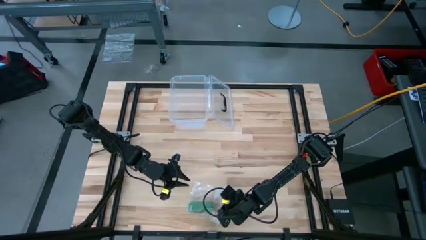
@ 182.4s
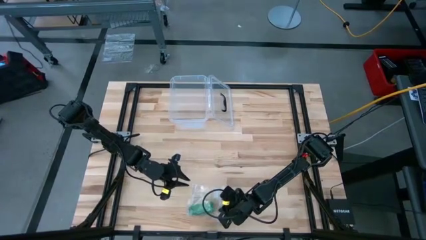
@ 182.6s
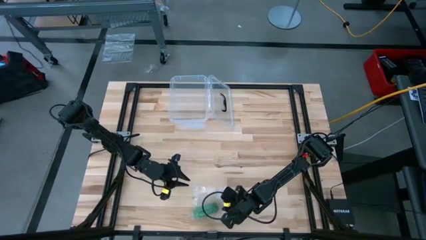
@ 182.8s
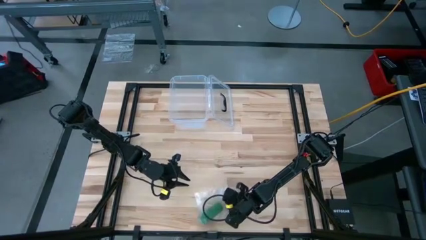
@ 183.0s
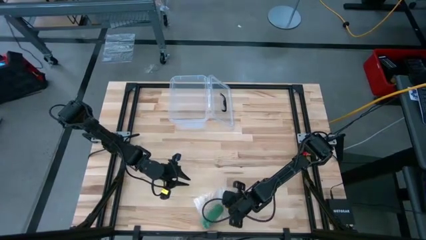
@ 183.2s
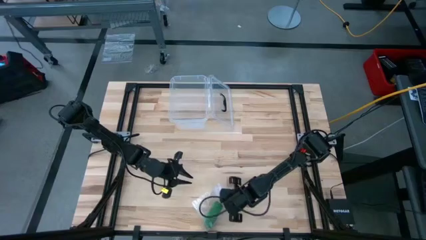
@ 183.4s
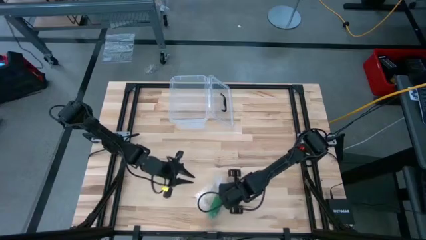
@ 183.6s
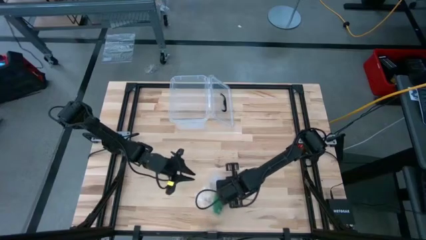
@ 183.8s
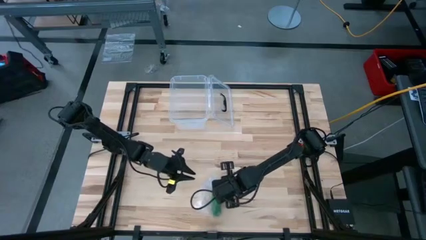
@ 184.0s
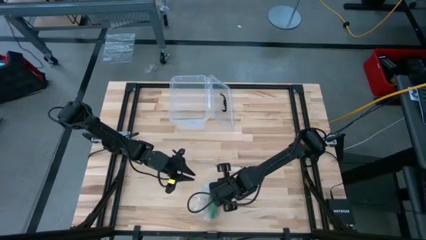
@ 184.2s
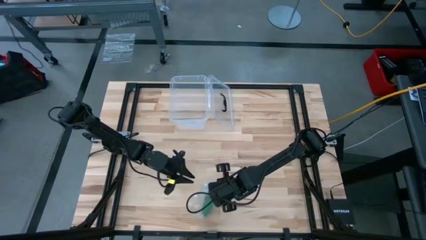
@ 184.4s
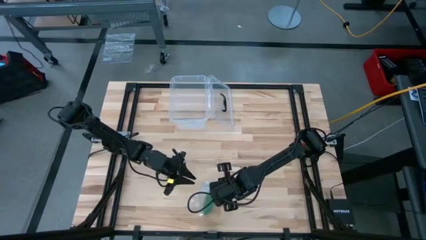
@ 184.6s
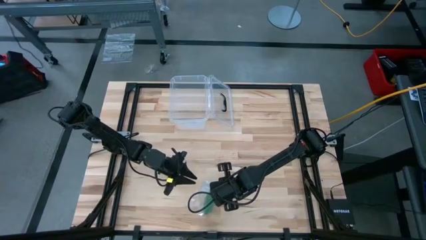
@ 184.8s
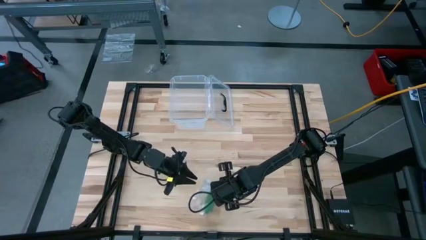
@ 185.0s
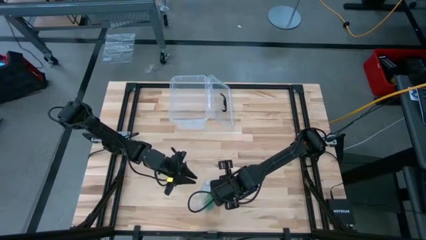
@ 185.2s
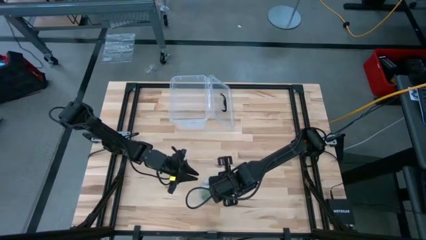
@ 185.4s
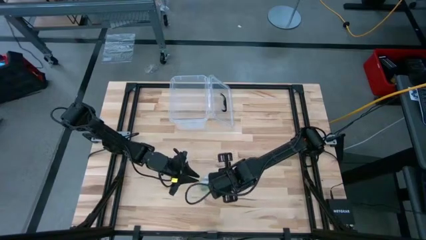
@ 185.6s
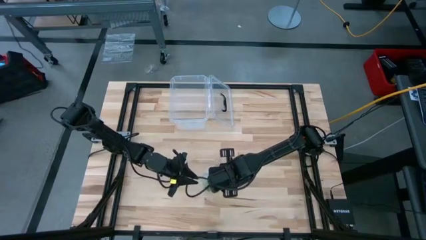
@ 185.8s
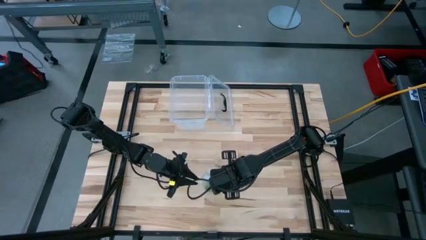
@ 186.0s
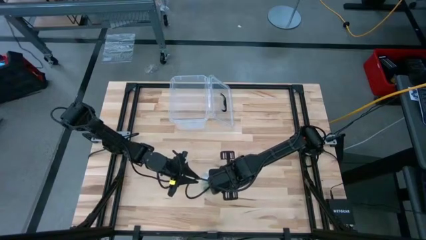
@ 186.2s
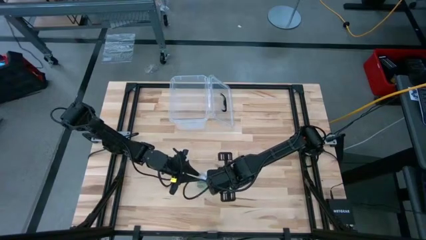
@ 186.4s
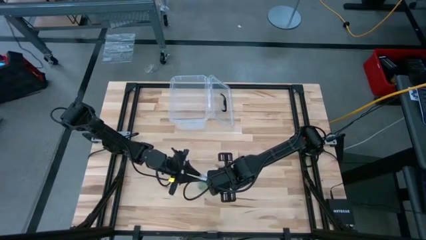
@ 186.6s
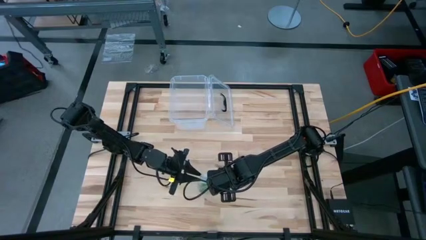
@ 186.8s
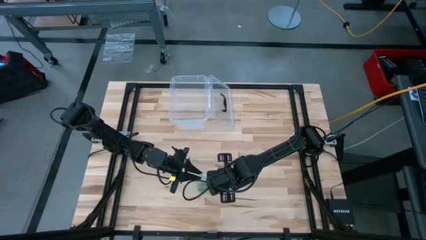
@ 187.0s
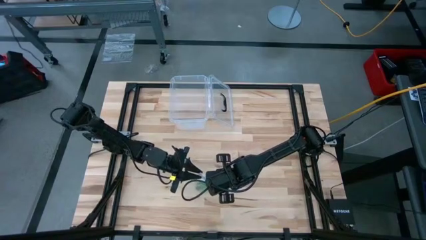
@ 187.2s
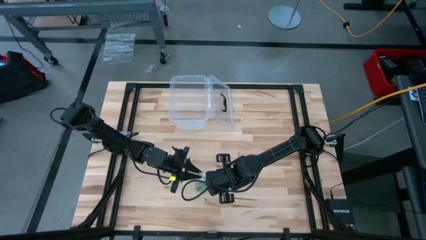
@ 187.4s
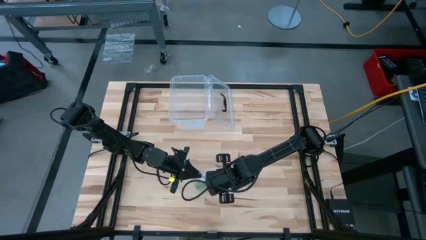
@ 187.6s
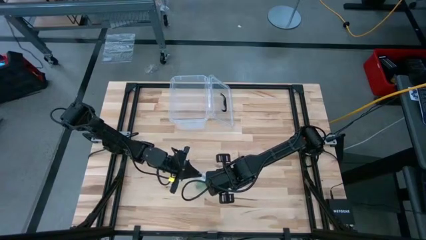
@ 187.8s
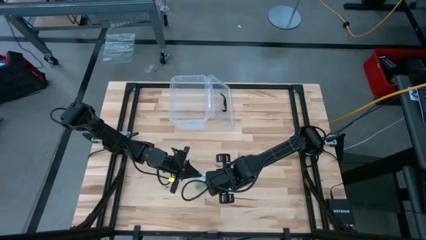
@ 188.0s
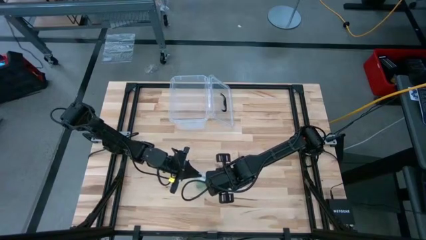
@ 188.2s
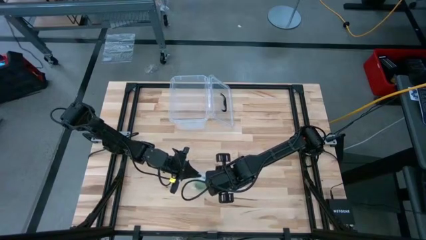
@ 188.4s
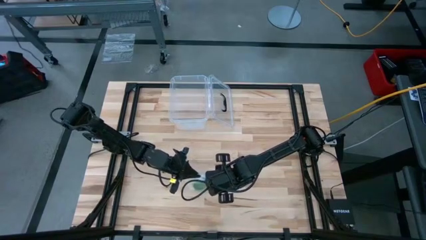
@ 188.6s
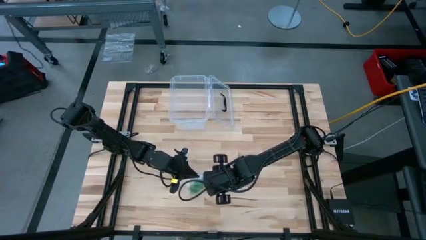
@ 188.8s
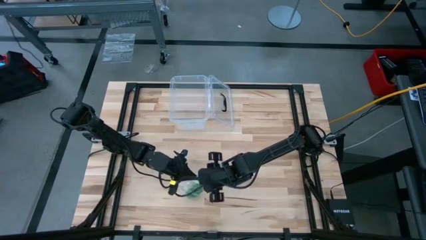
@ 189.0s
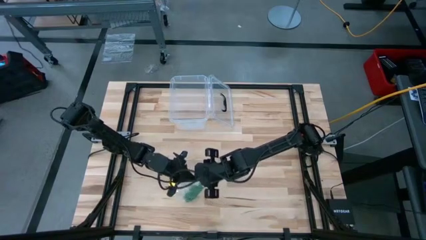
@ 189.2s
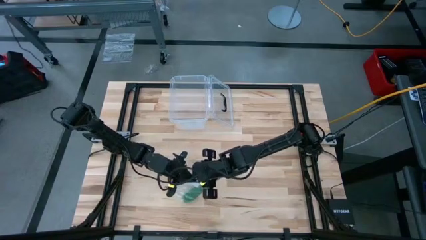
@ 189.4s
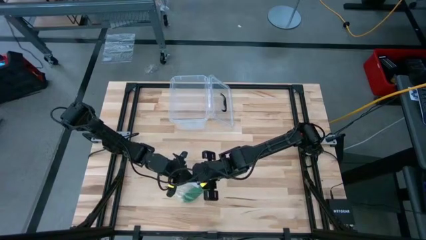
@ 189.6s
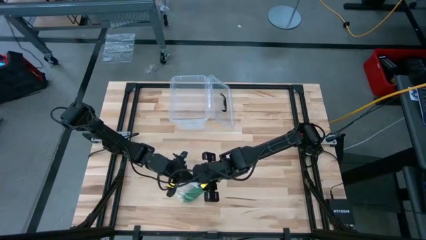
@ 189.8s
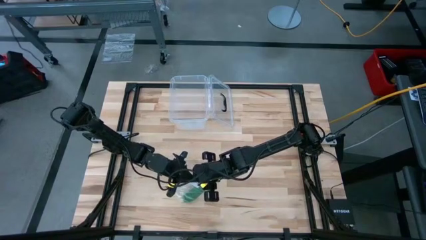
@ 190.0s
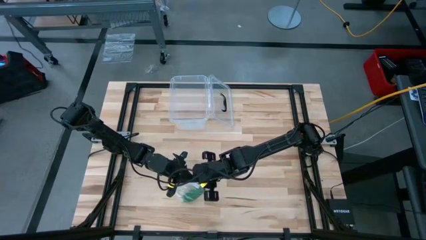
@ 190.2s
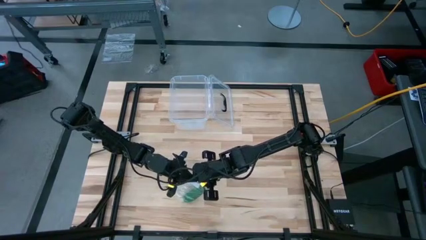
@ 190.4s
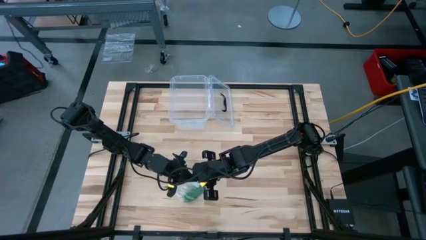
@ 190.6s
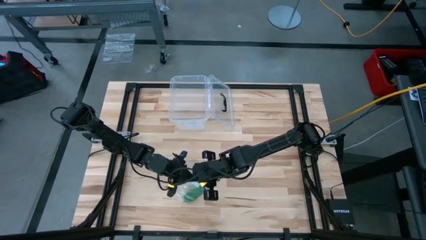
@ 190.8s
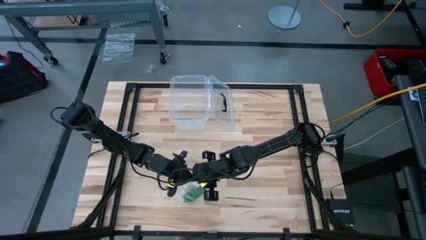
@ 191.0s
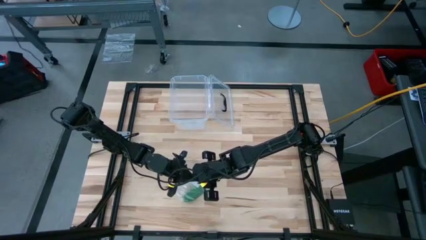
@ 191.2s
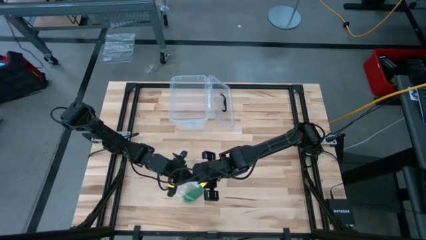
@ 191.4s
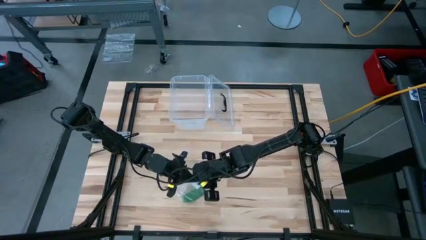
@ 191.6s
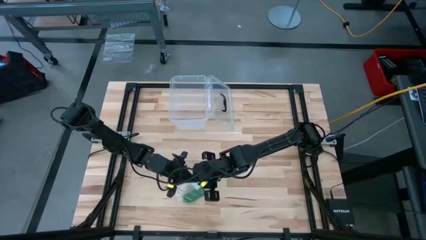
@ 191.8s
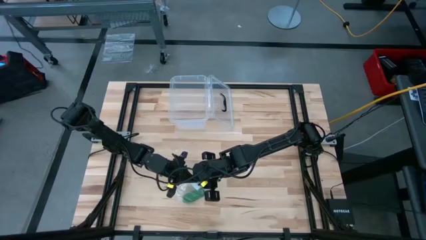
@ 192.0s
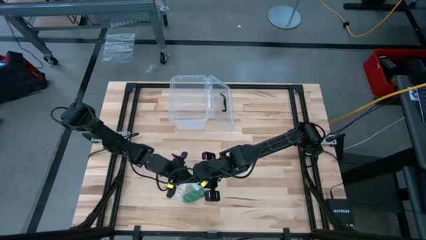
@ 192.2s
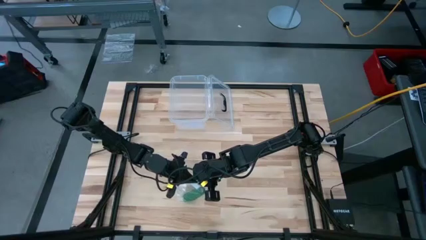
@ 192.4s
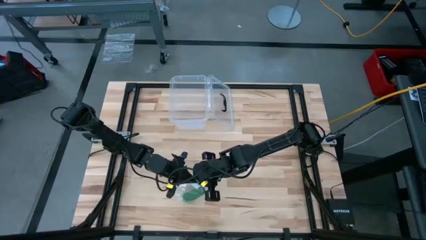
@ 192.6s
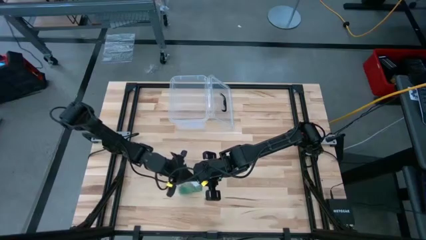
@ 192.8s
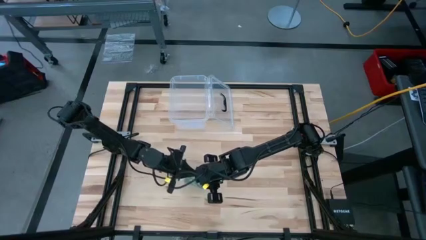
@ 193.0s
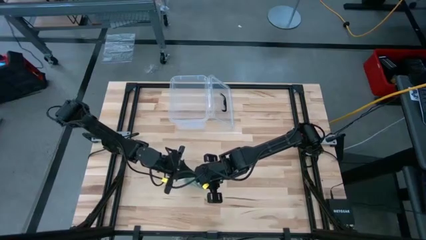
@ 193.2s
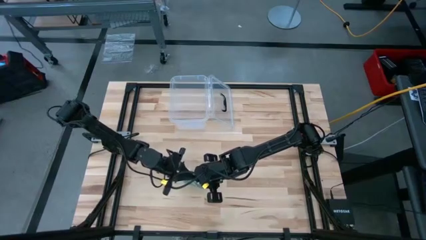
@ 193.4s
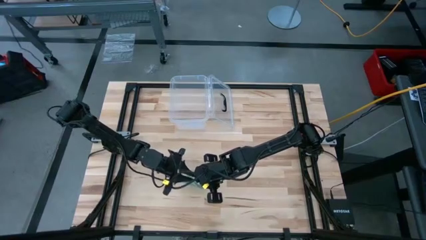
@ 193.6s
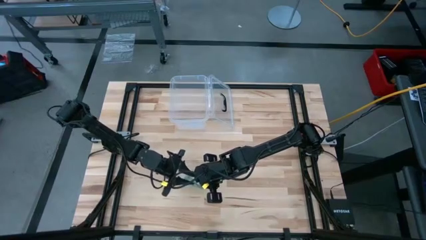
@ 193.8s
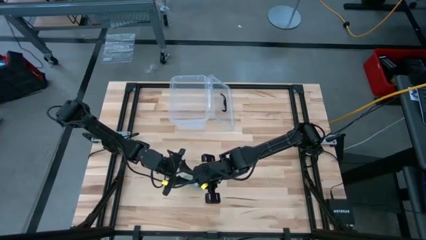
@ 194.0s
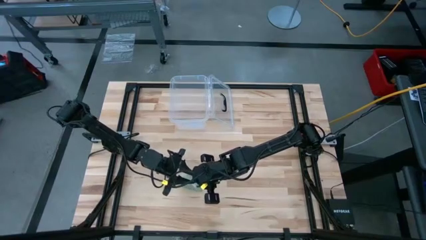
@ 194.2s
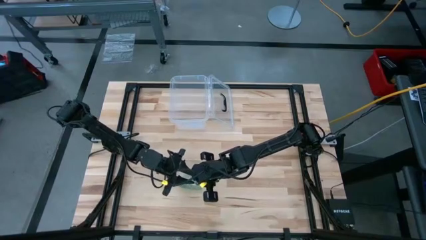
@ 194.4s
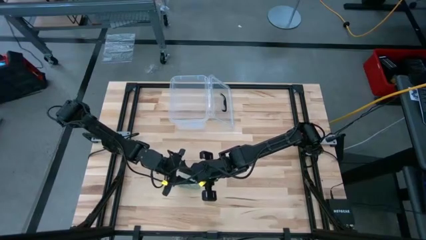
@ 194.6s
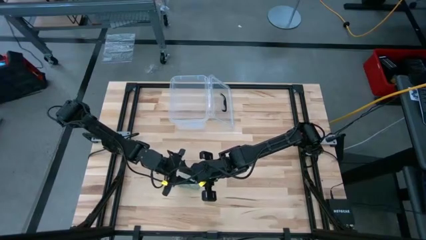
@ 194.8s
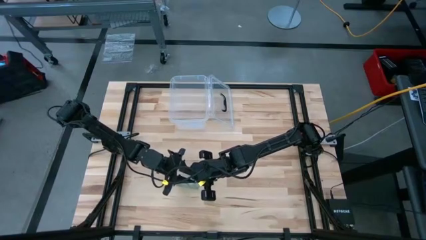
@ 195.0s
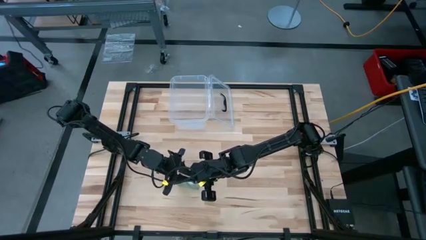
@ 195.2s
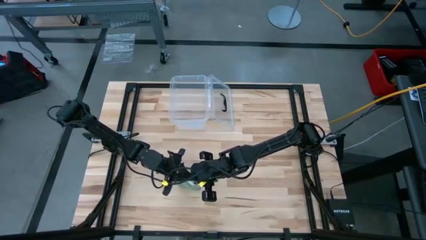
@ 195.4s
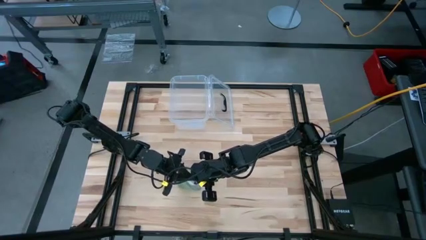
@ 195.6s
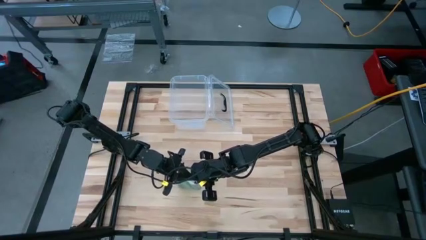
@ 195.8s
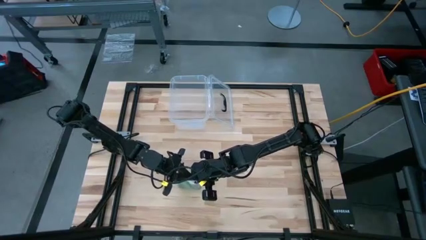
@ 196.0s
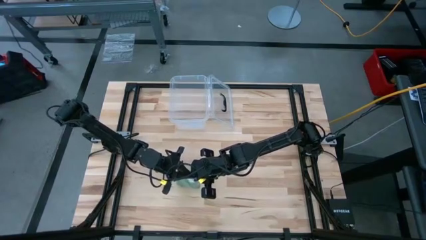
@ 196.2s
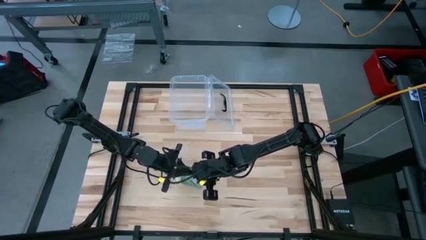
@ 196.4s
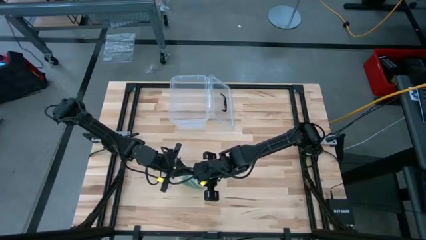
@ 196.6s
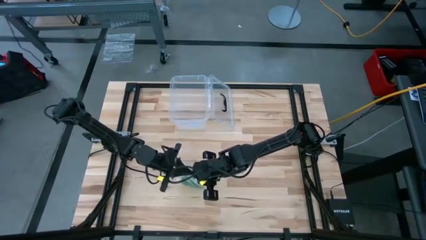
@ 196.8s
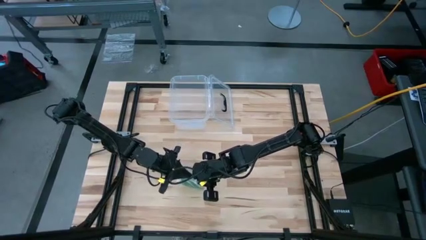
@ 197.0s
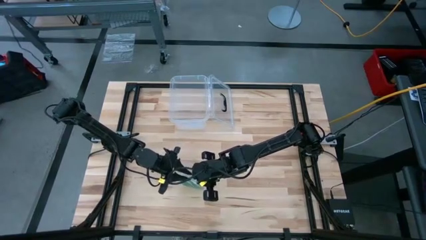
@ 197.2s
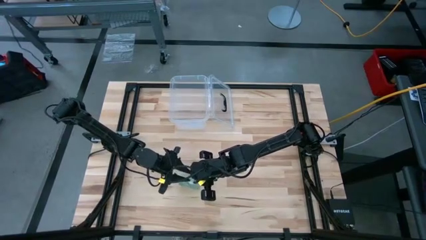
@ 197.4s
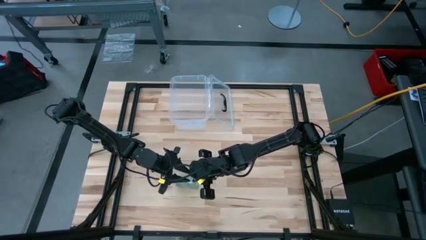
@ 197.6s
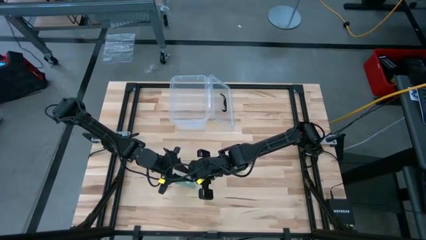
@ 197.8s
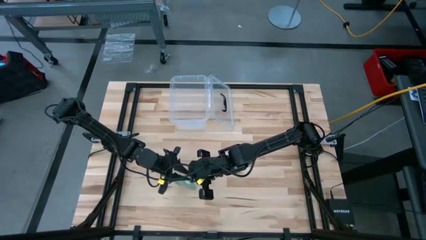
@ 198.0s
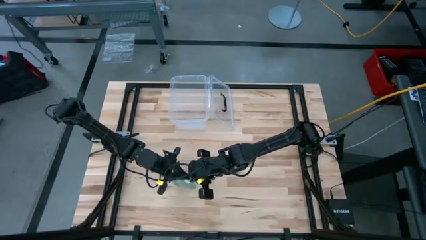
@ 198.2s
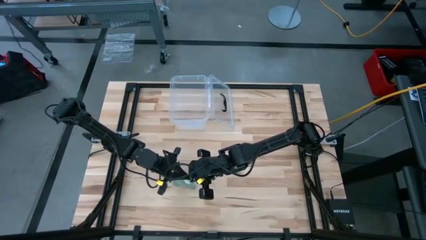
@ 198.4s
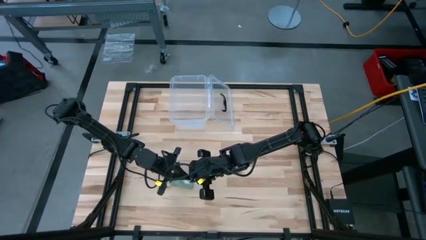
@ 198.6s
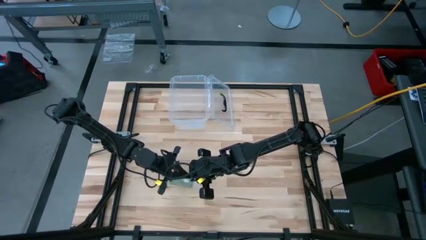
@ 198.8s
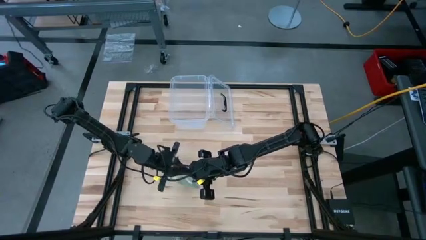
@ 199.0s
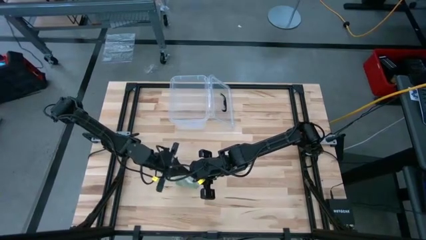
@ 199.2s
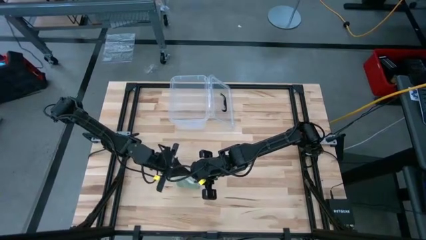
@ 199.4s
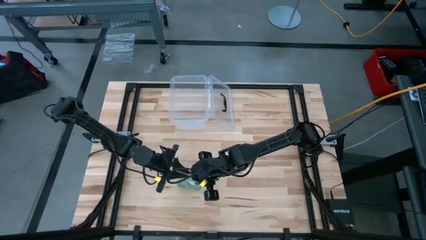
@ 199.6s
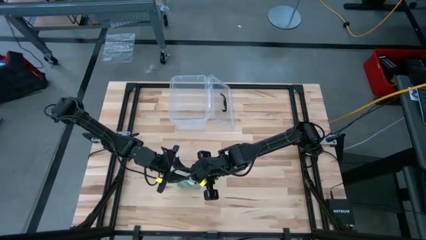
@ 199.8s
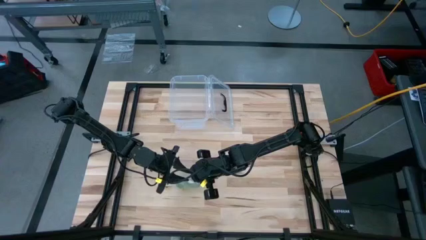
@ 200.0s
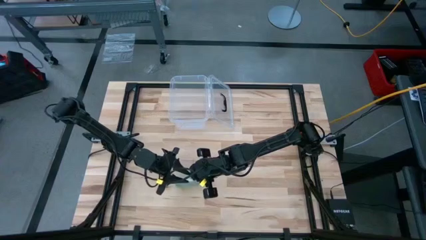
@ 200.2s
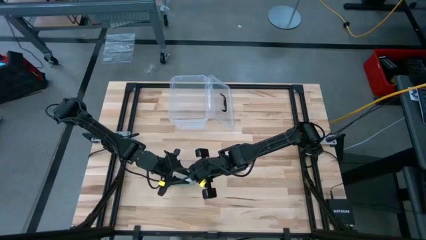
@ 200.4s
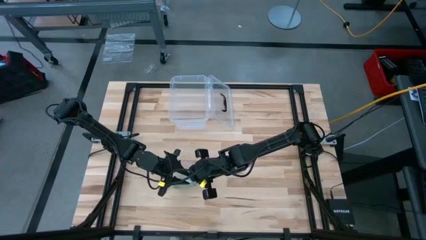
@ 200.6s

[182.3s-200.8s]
Task: Roll bandage
Close the transparent zip bag
